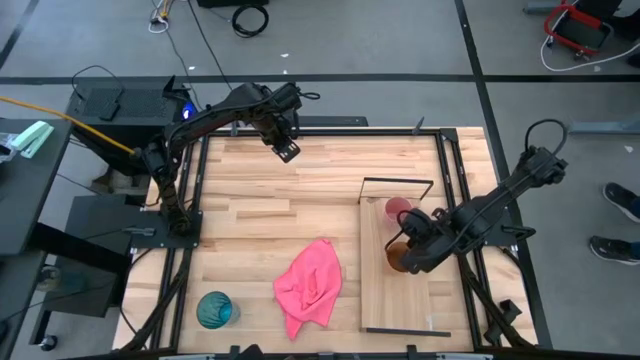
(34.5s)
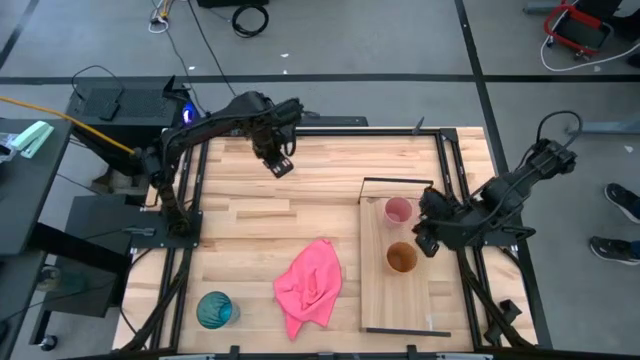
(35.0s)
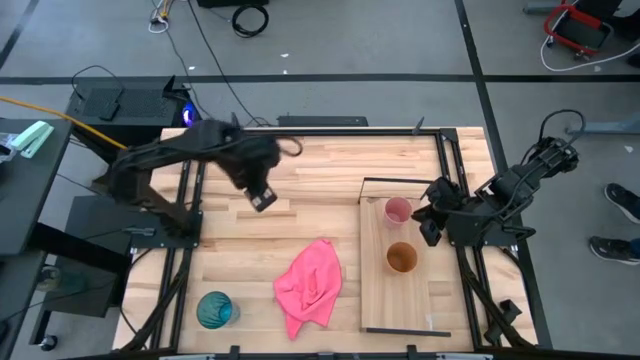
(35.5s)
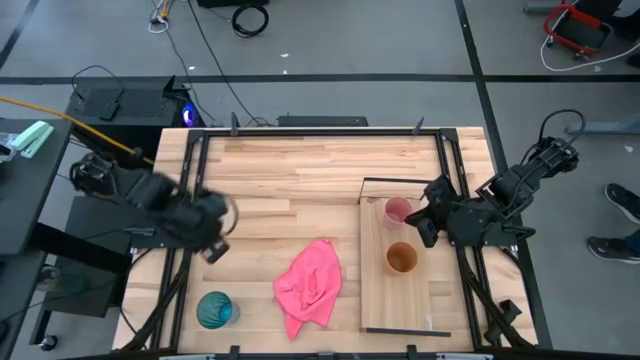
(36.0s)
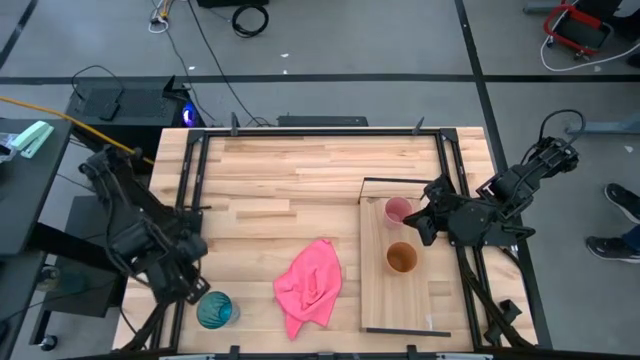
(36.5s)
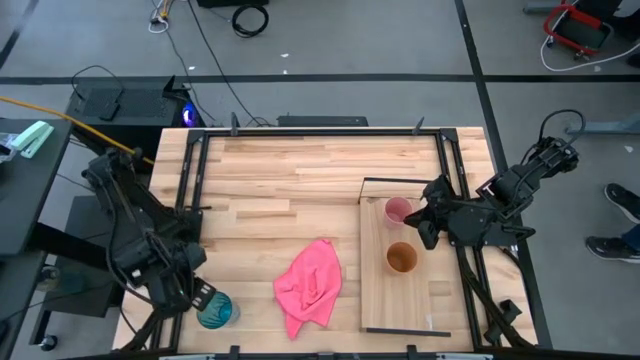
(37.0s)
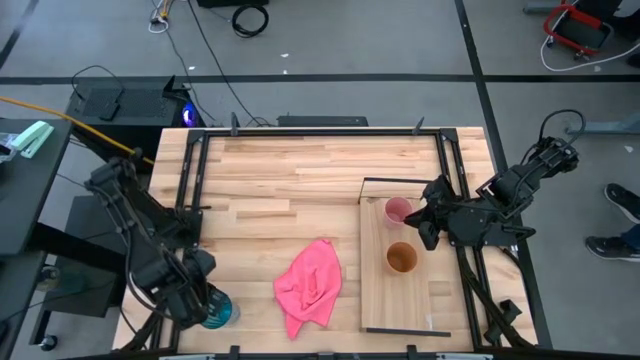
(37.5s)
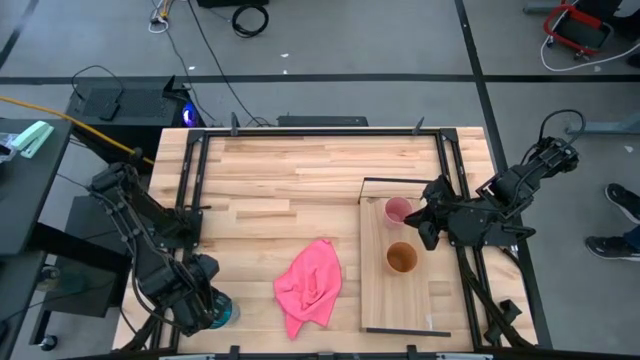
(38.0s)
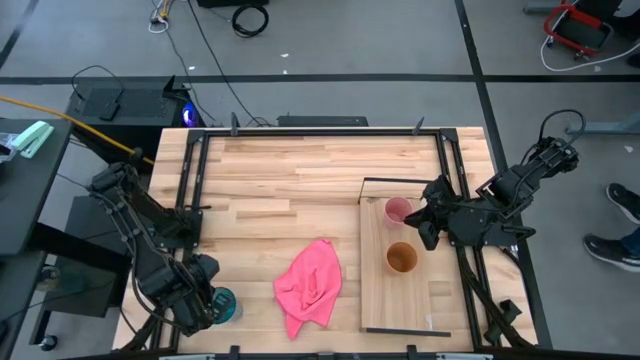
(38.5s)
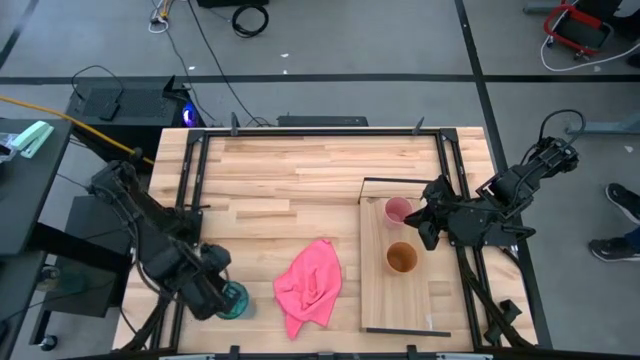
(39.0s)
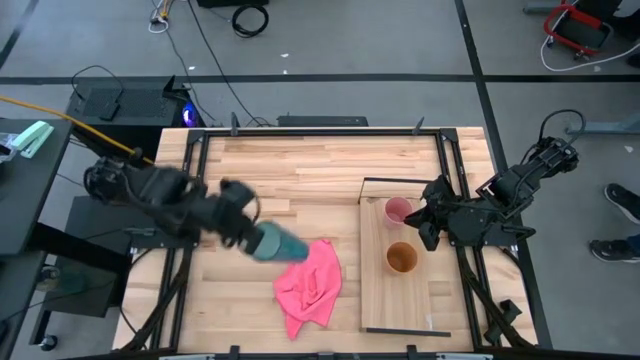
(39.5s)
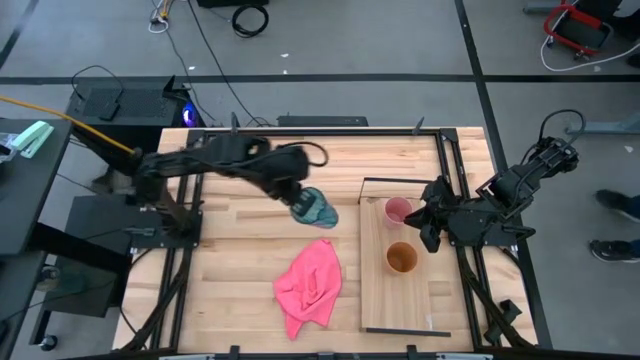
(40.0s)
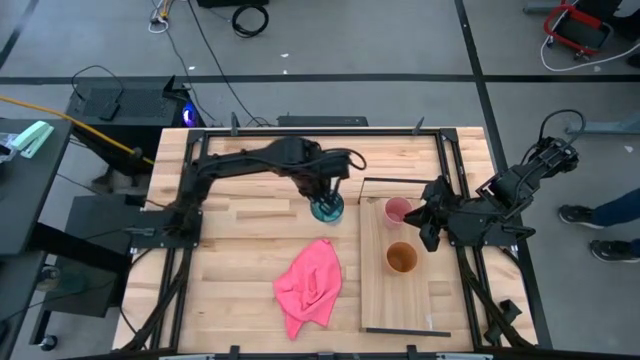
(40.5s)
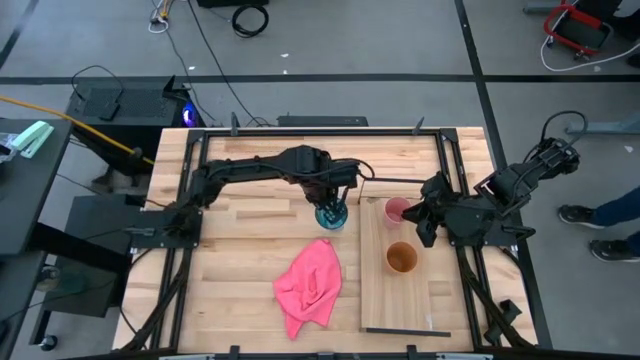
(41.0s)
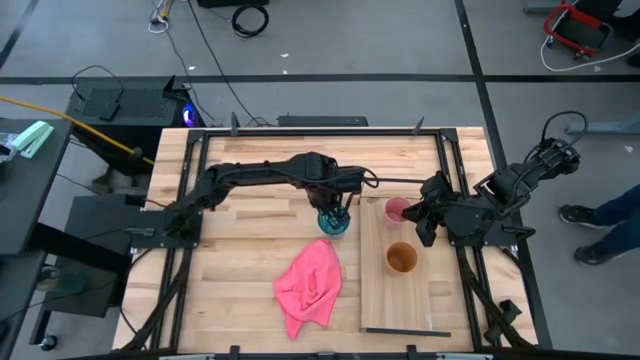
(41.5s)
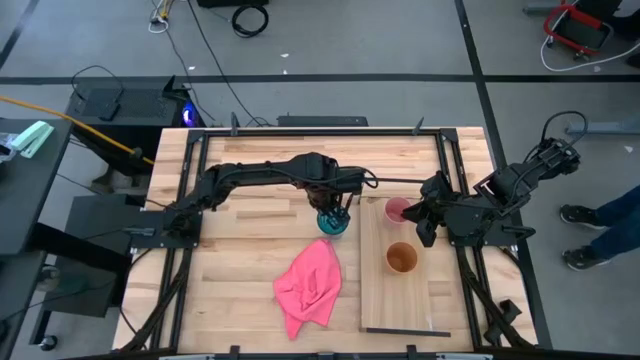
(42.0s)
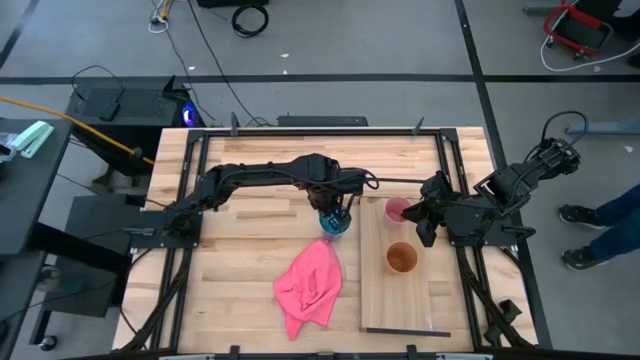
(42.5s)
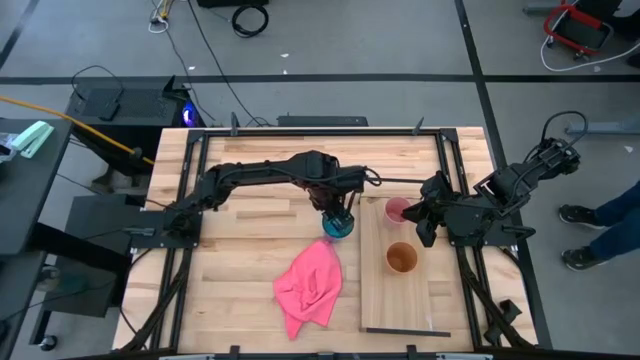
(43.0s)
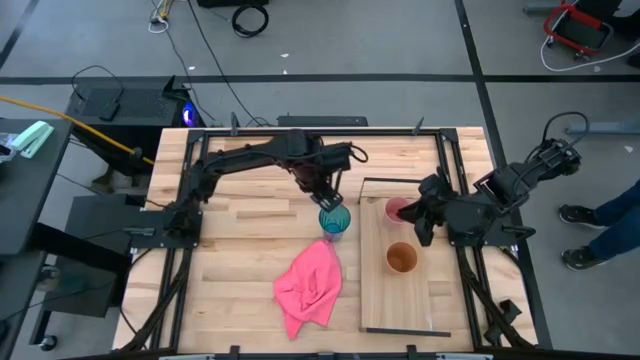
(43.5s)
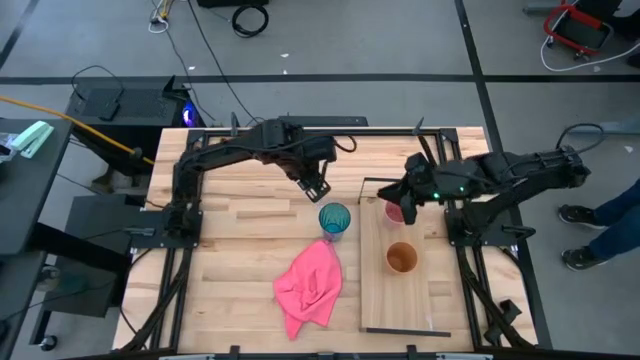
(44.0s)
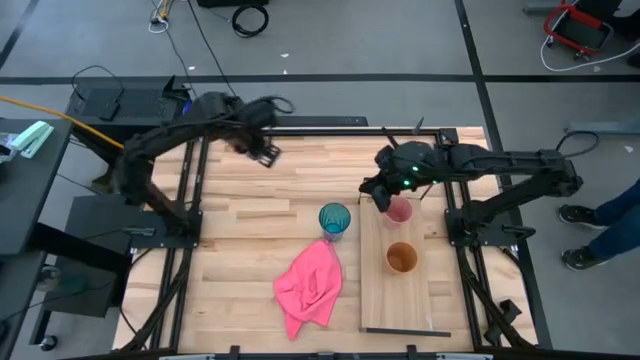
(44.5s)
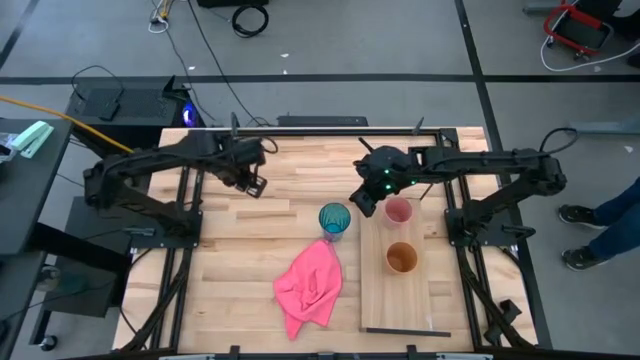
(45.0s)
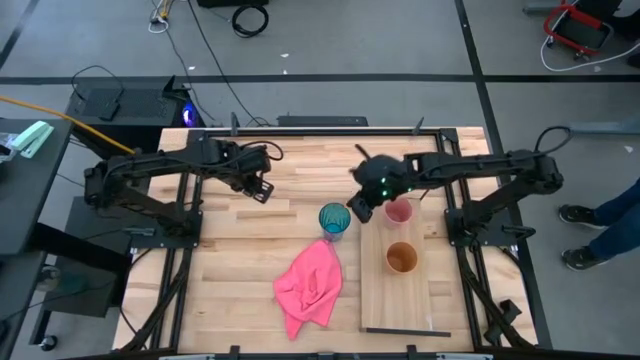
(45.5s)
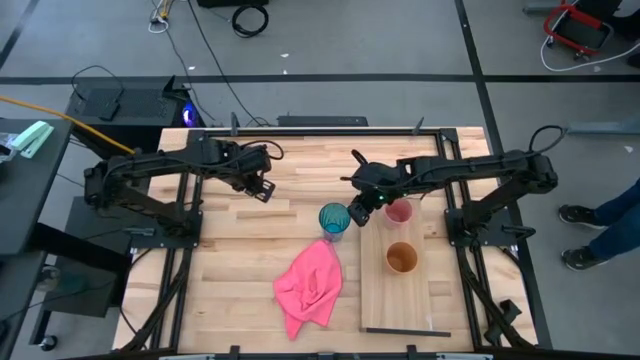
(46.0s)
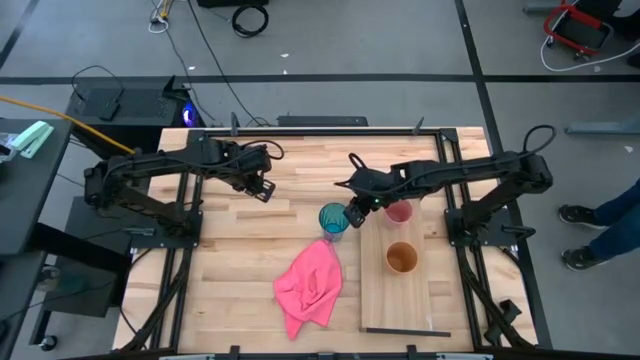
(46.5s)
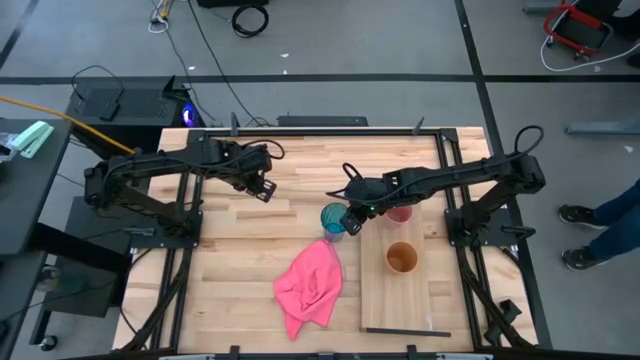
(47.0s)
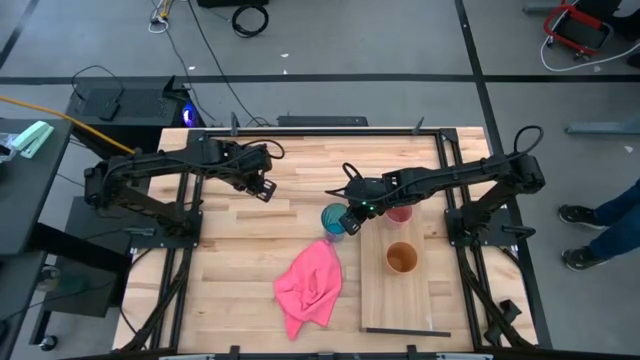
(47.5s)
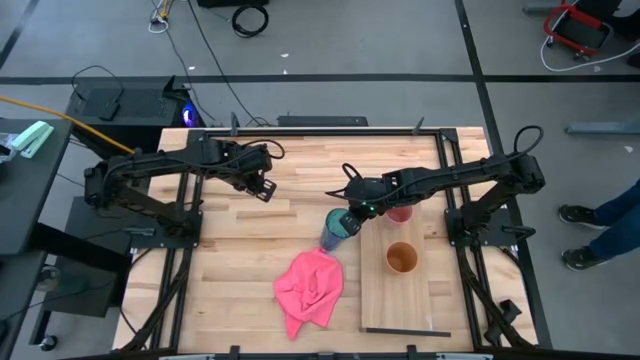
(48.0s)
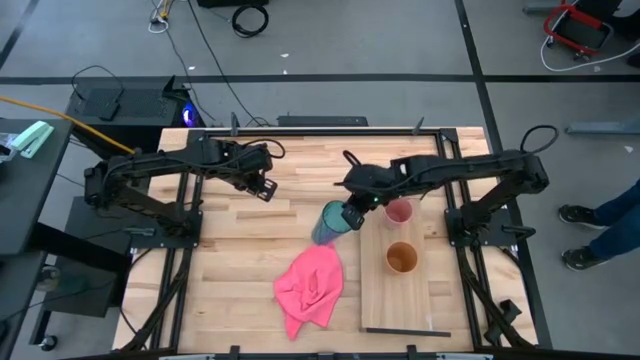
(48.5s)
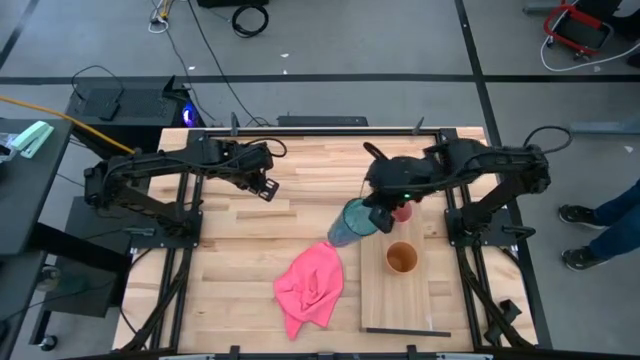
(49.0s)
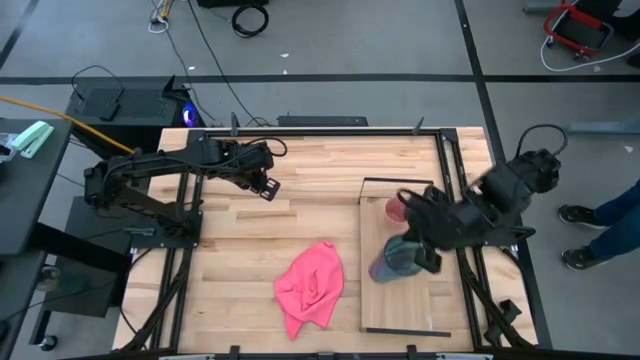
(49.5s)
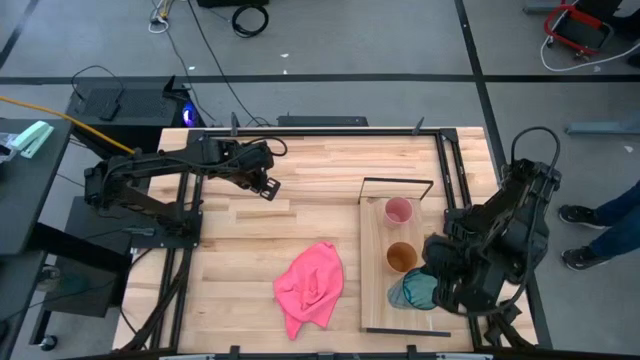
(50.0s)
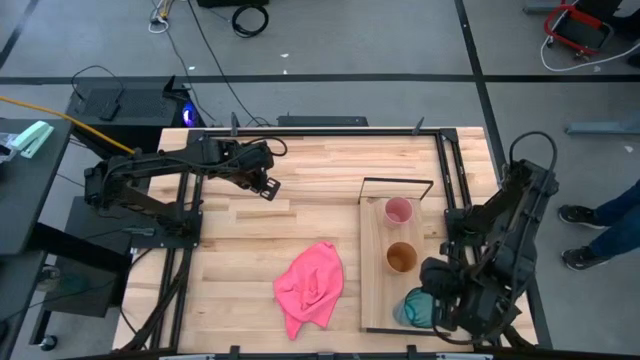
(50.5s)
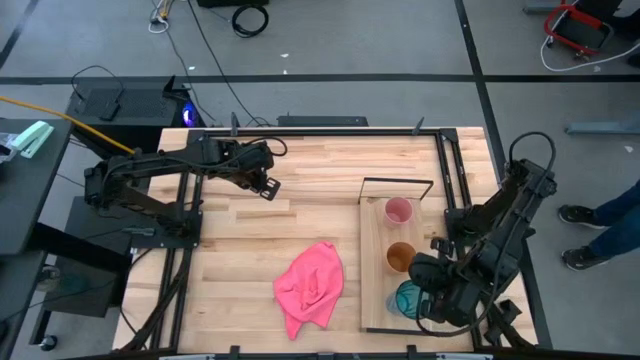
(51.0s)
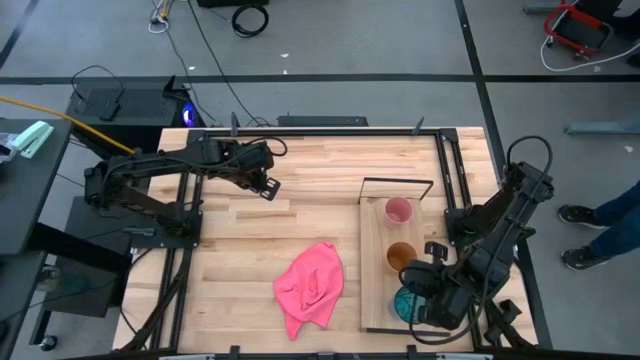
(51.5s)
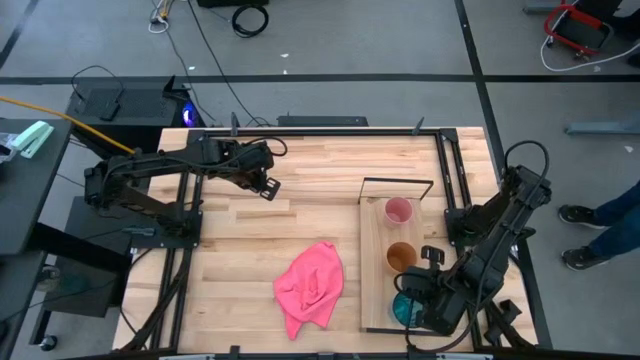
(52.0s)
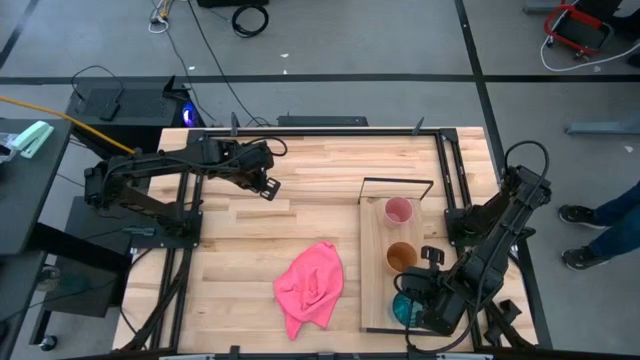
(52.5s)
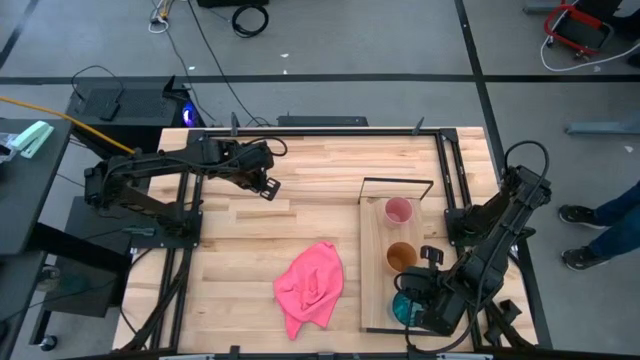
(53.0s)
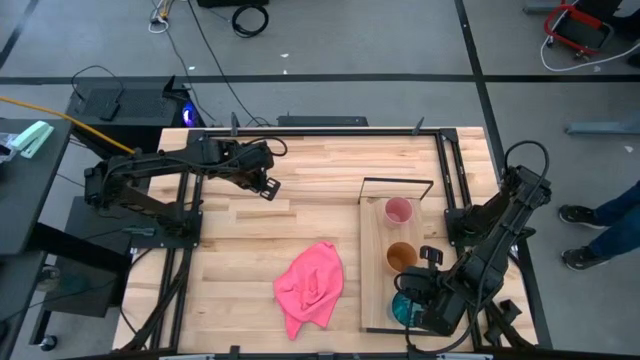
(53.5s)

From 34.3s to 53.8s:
Task: Stack small to large cups/mugs on shelf
Put the blue cup on the shelf
